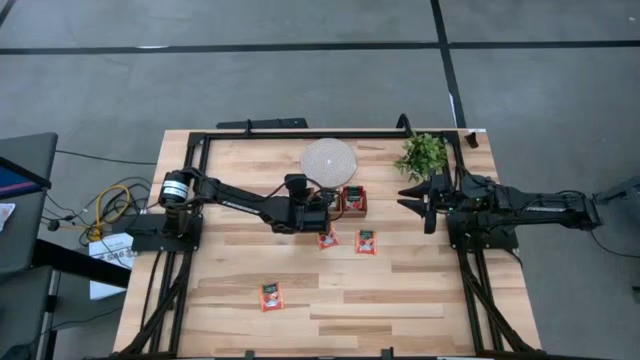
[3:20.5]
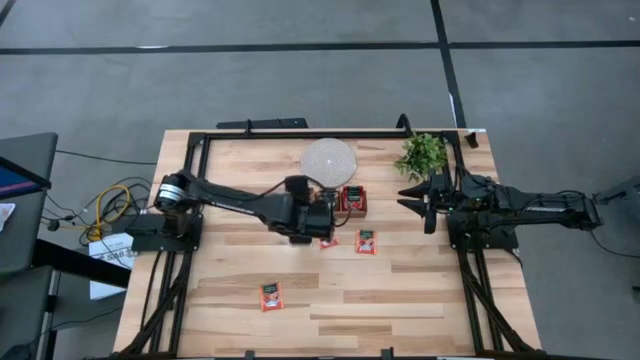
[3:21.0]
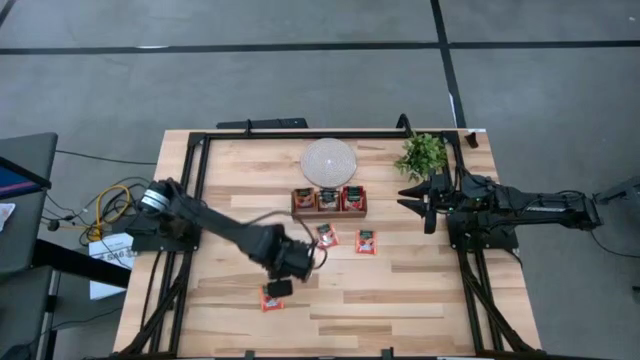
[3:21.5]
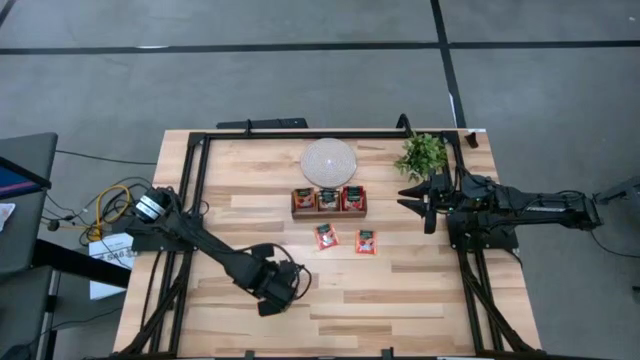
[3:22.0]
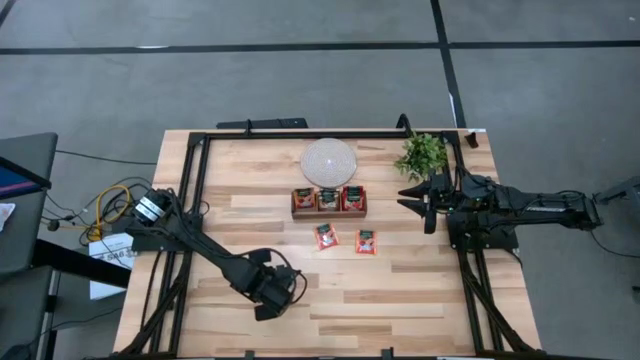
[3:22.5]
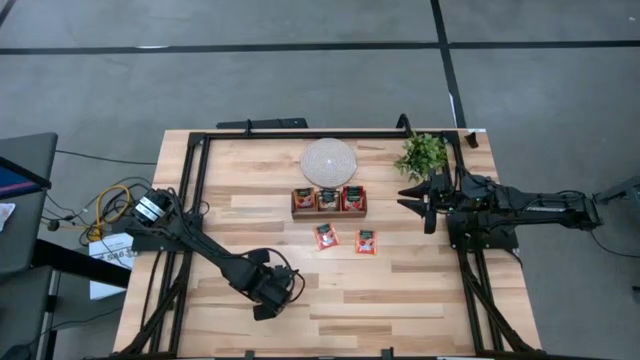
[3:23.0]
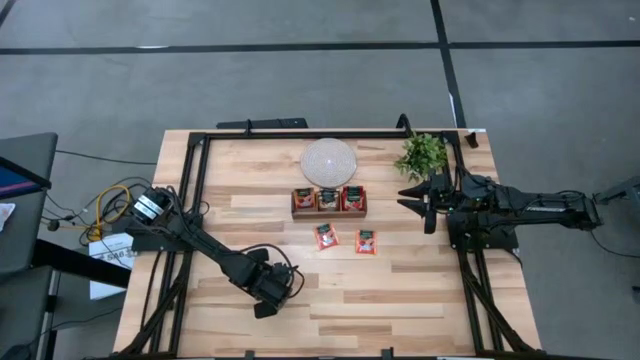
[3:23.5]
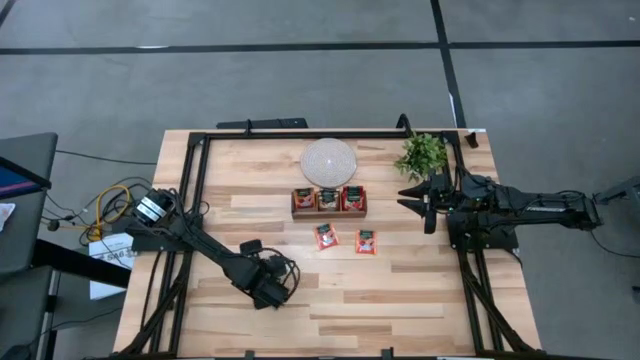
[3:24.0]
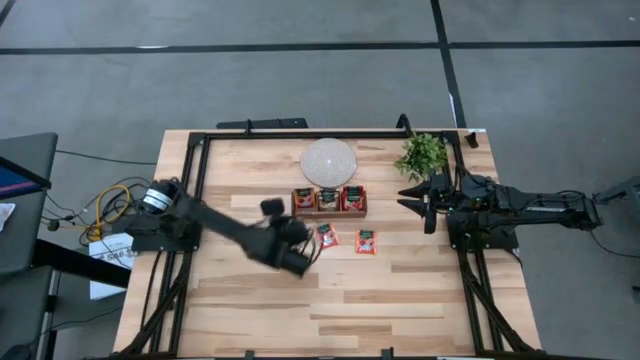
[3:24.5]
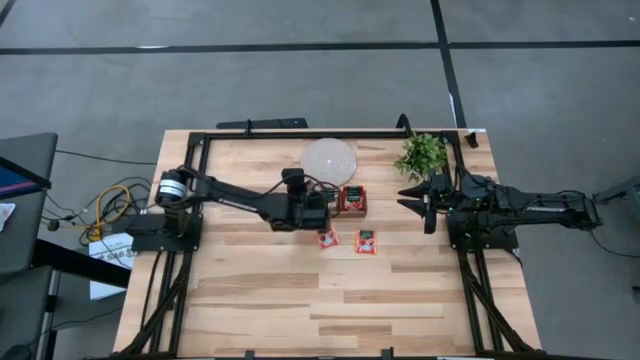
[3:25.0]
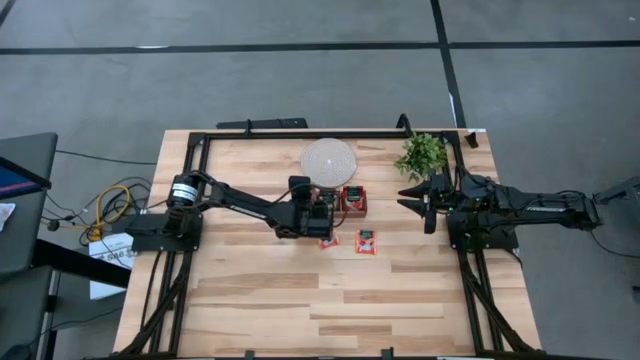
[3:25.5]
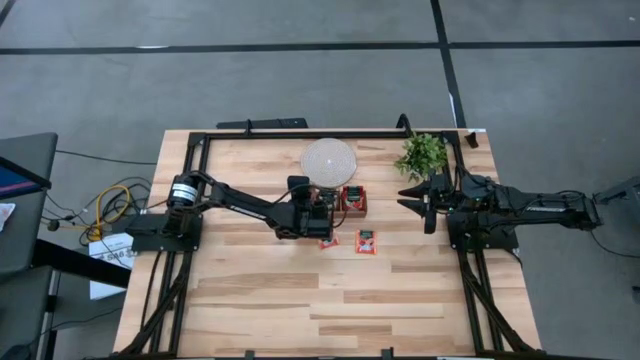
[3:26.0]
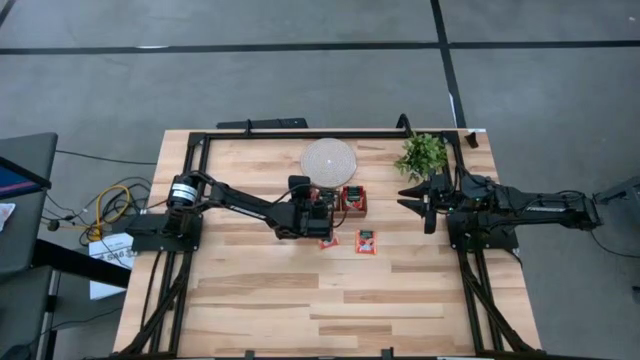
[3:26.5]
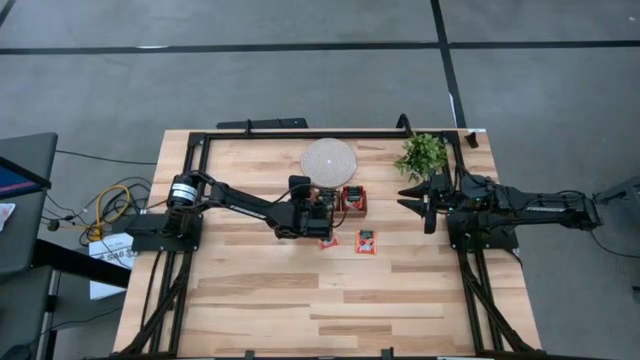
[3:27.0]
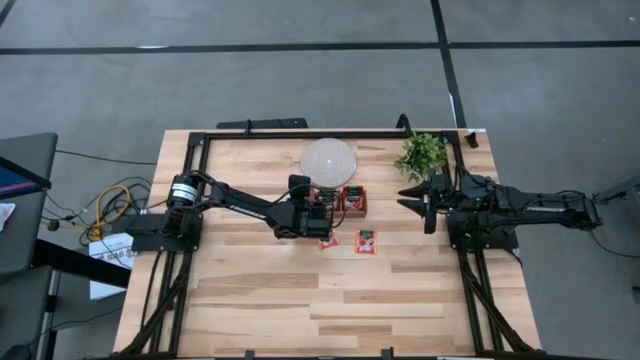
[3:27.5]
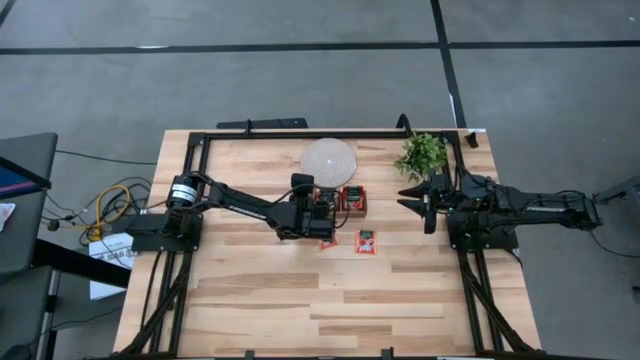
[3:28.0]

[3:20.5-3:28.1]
Task: Pick & Place Tea
Put the bottom orange tea bag into the left slot of the wooden organizer

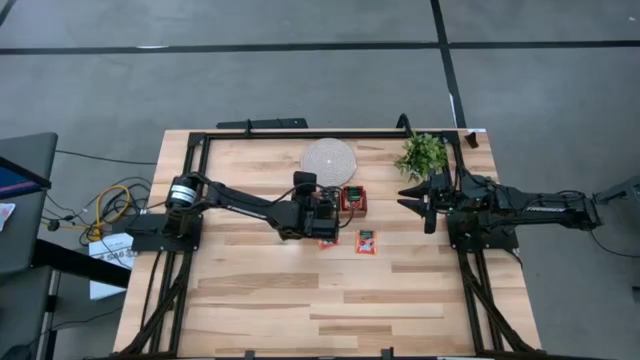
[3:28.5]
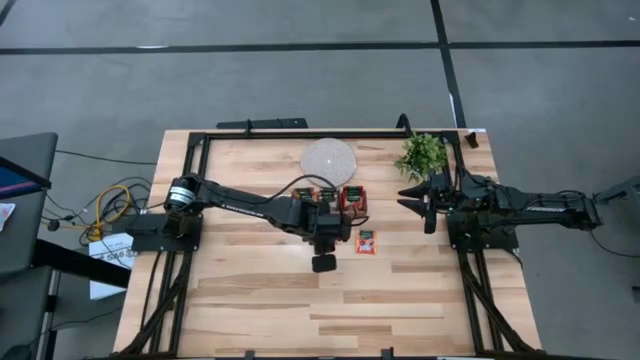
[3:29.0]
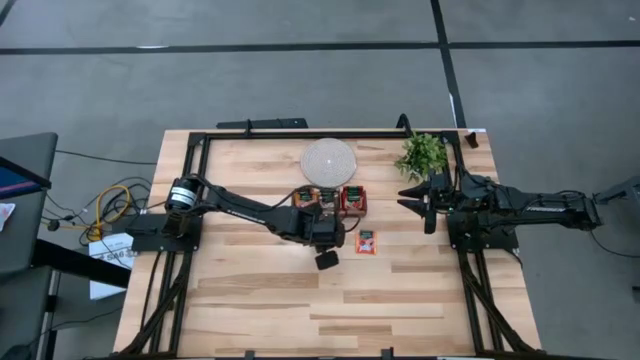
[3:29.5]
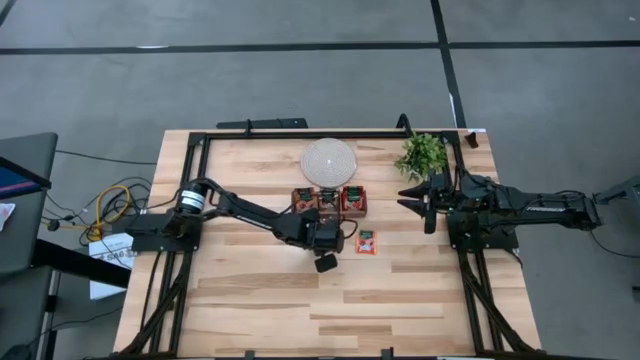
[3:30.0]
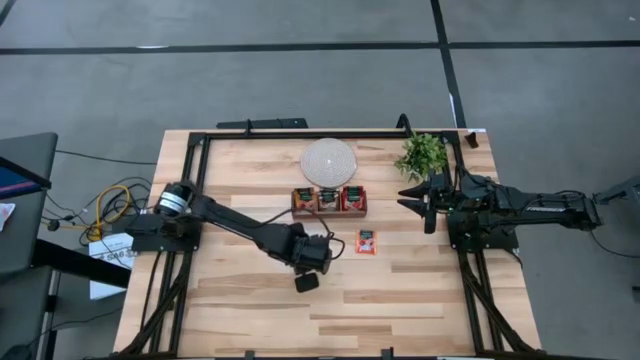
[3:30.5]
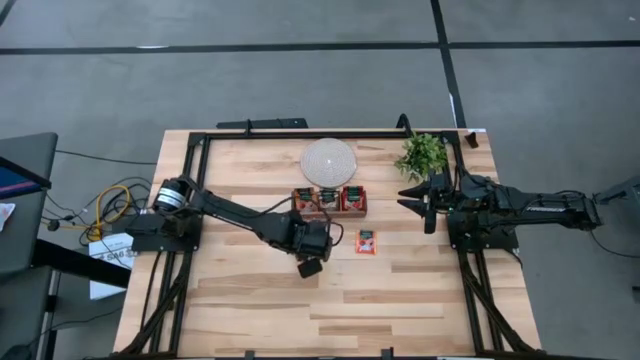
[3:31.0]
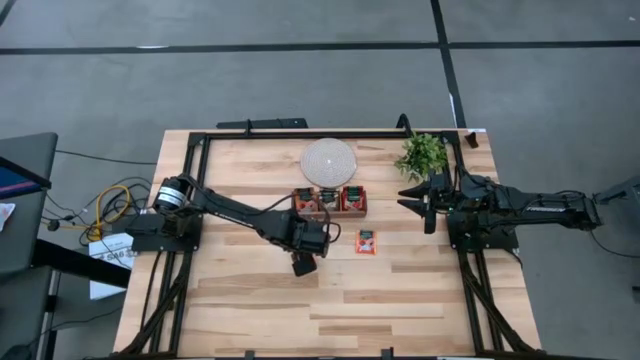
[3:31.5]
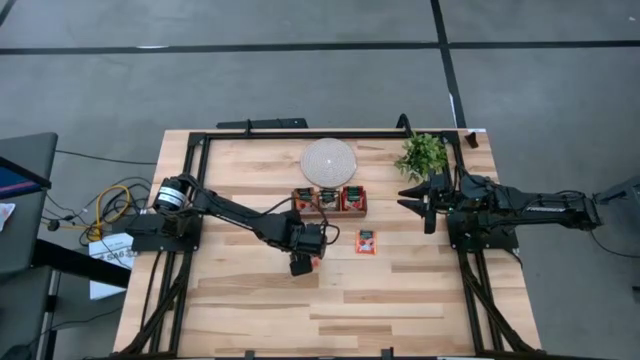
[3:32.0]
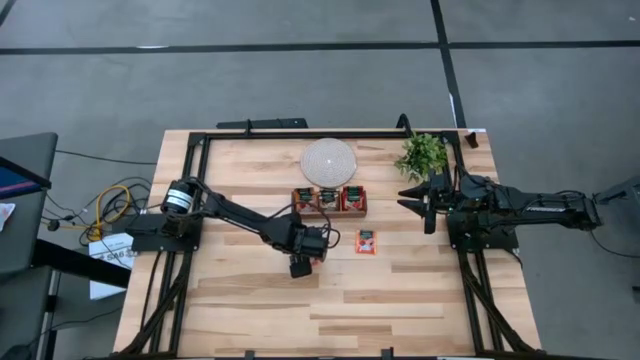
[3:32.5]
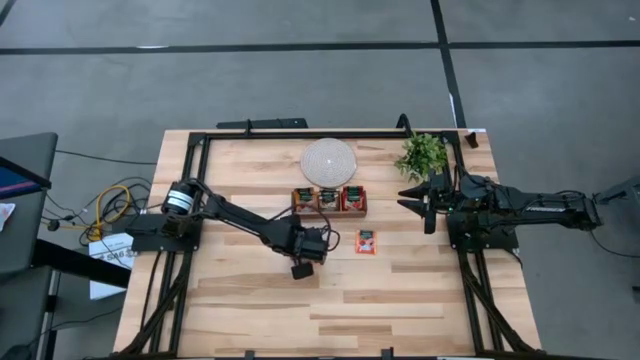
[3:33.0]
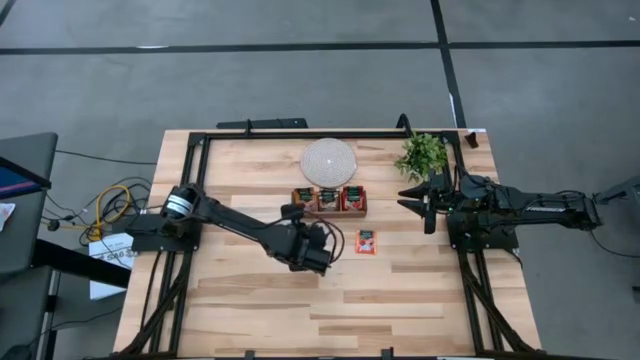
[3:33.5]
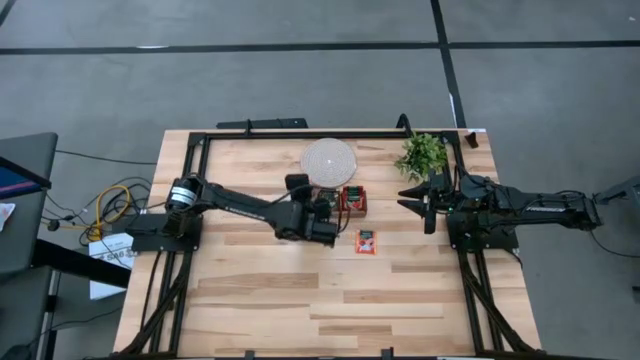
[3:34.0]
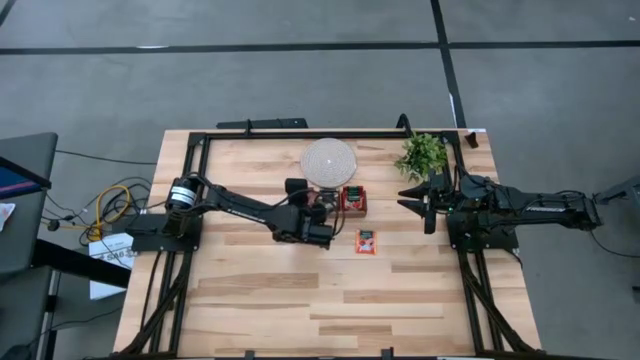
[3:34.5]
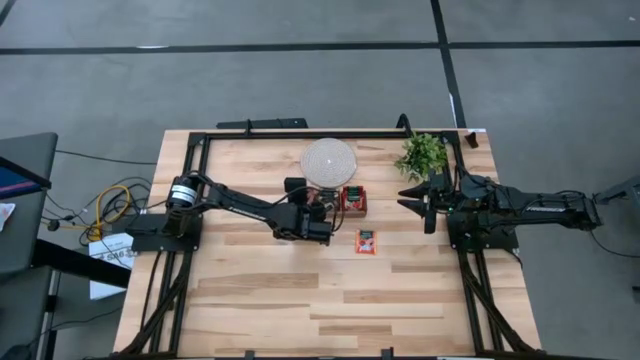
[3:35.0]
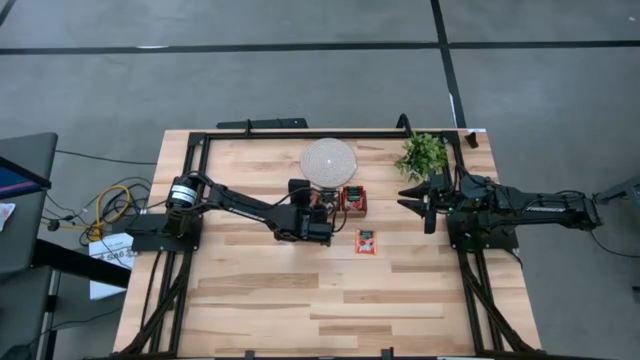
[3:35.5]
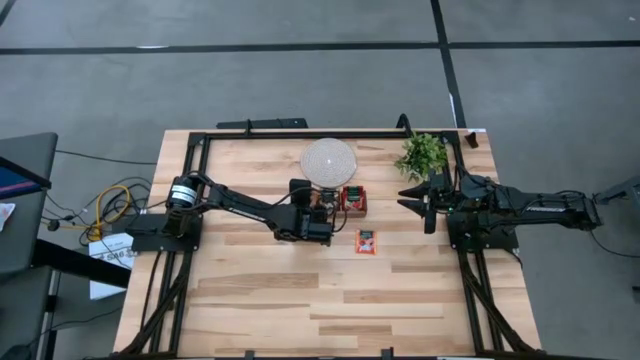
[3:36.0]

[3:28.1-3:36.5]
Put the left orange tea bag into the left slot of the wooden organizer

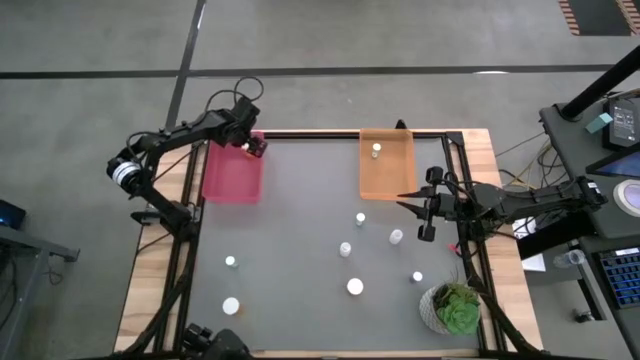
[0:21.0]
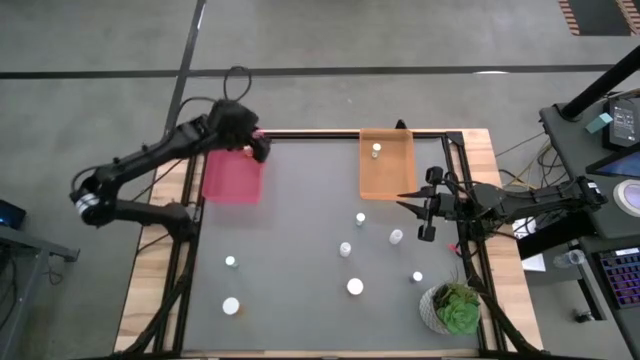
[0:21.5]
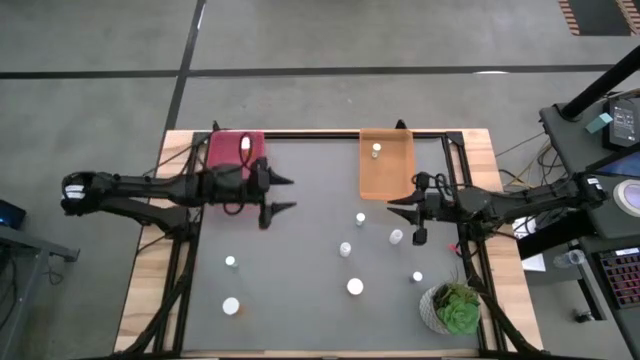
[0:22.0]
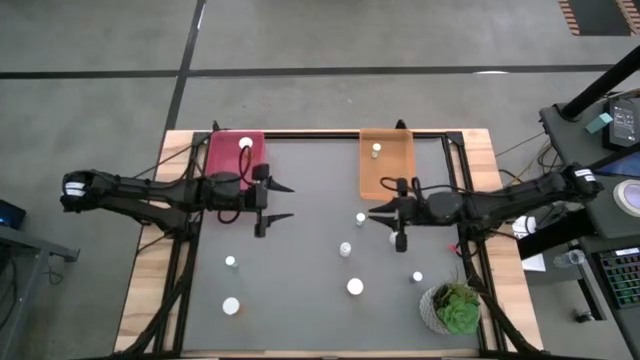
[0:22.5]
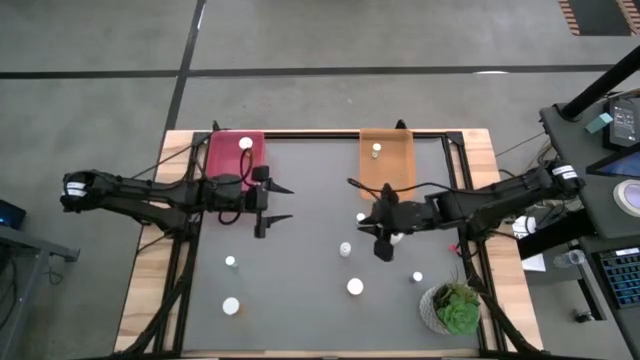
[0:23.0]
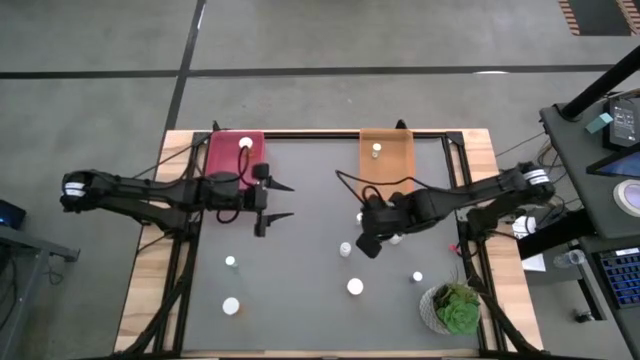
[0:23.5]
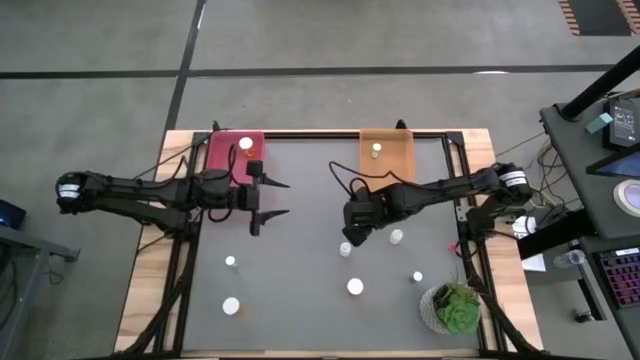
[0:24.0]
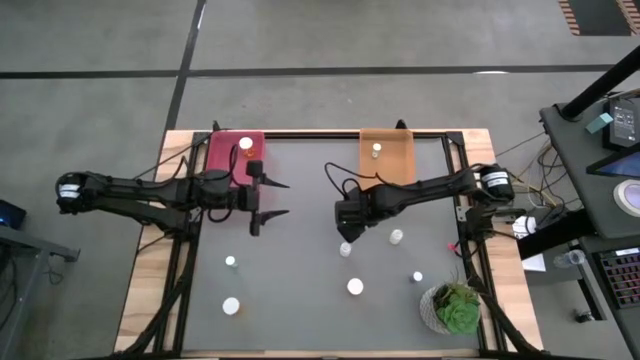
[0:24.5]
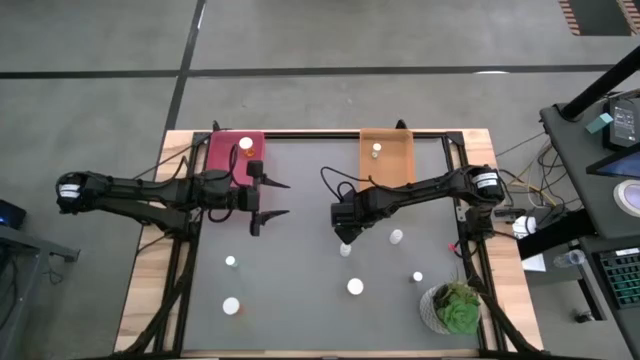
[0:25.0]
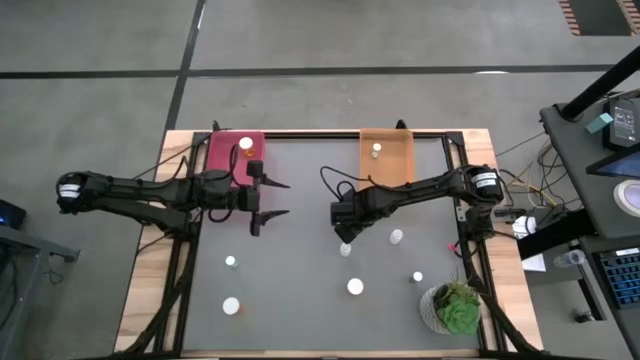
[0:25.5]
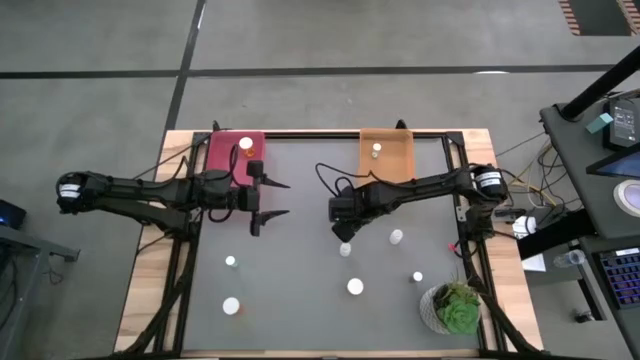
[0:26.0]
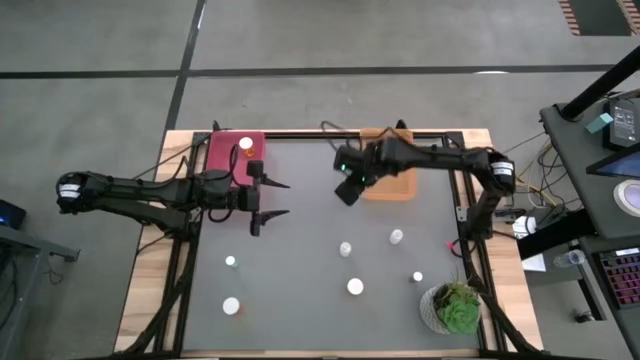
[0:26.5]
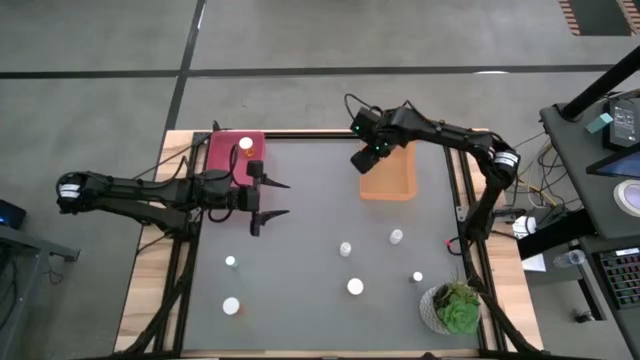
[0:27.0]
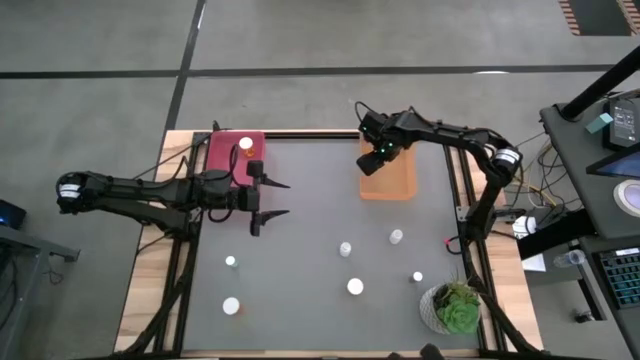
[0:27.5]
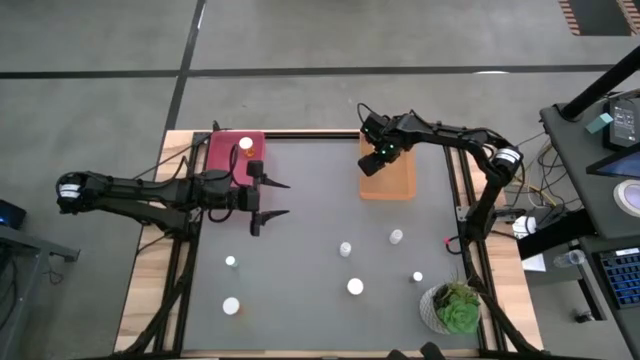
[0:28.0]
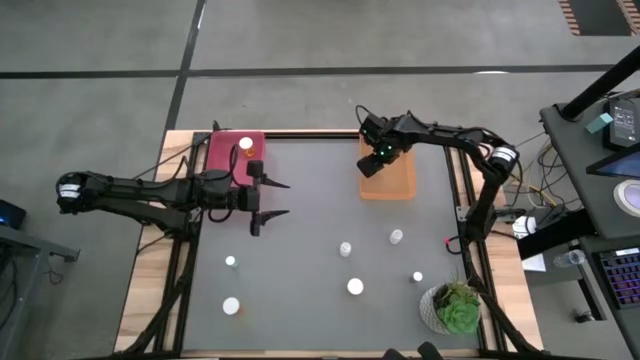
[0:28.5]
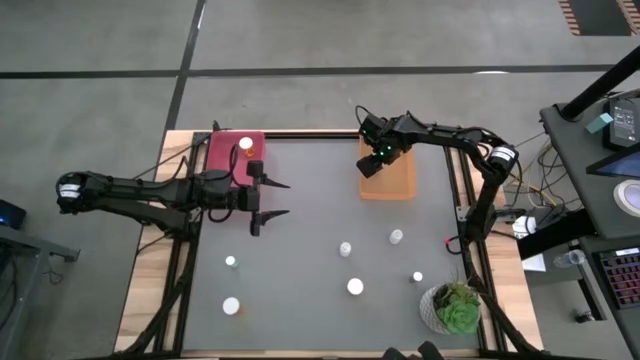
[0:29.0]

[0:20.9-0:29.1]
Task: Pick and place medicine bottles into bin by pill shape (circle, oval)
Put the right blue tablet bottle into the orange bin
